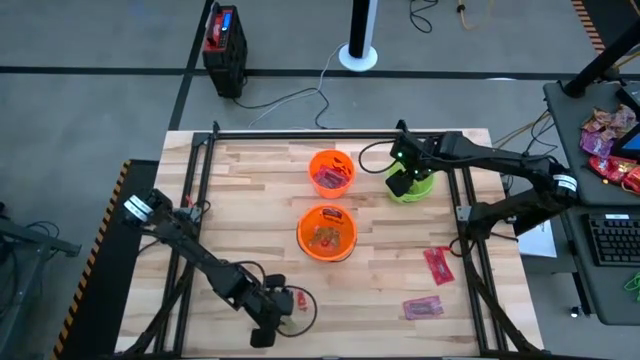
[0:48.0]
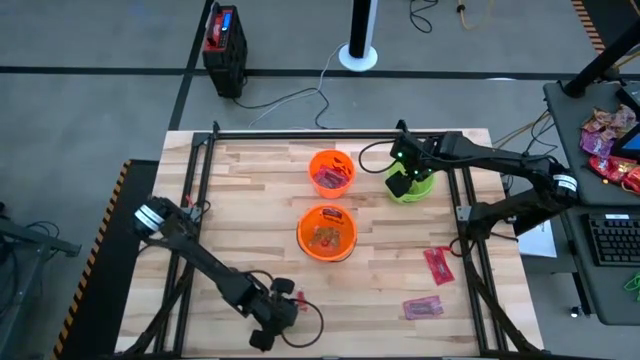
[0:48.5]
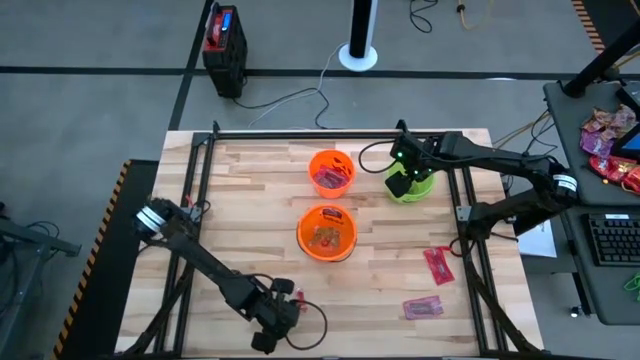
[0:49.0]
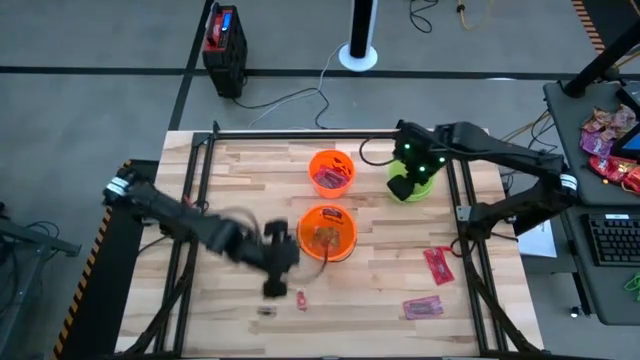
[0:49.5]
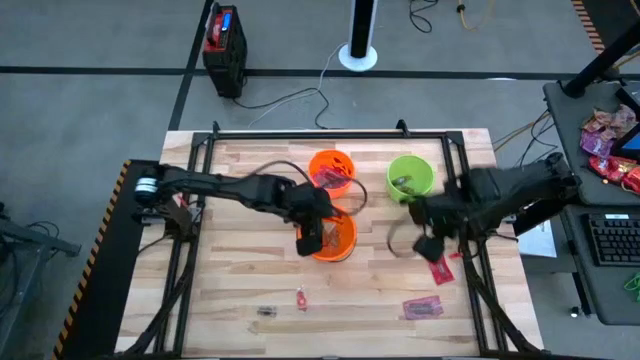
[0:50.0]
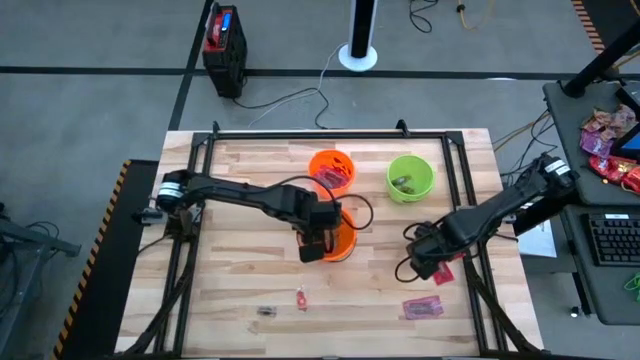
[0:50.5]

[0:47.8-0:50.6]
Task: Sort candy by brand, put in halloween buckets
Put the green candy into the bottom orange bin

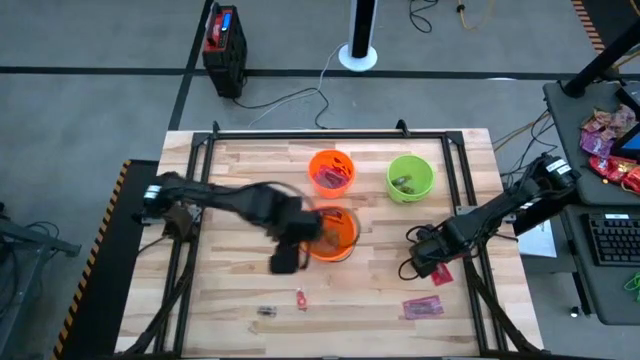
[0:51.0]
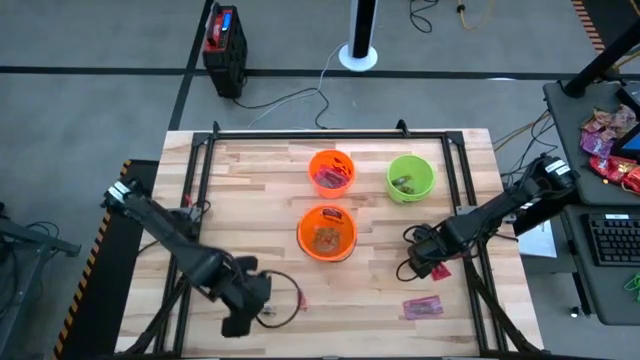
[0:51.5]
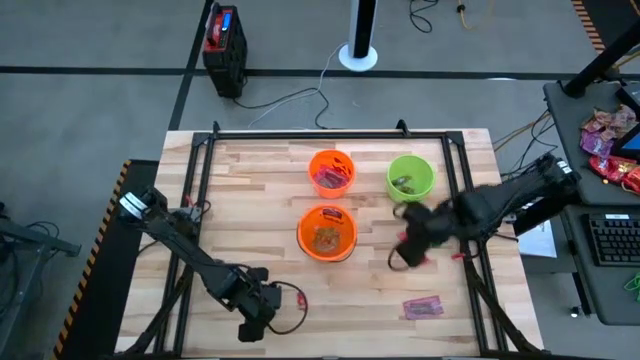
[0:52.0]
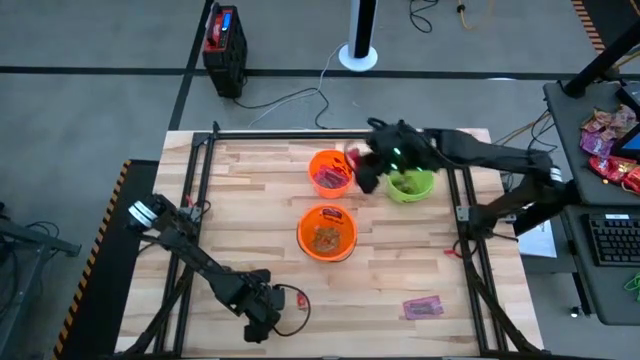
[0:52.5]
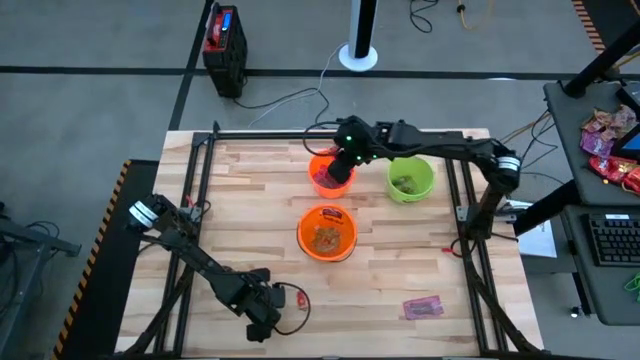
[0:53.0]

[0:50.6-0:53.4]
Put the red candy into the top orange bin

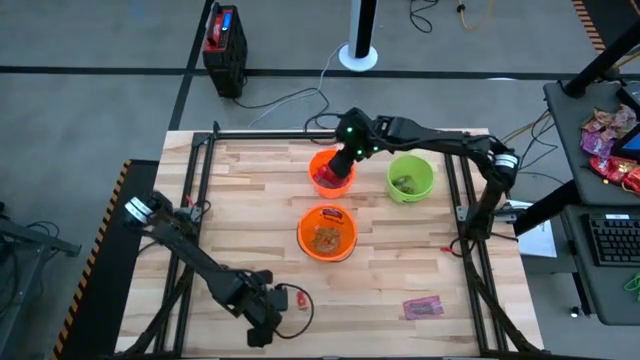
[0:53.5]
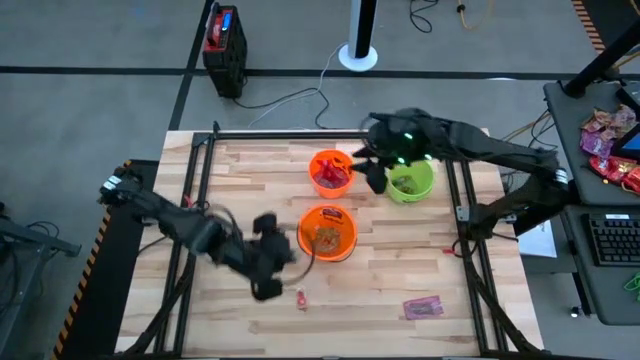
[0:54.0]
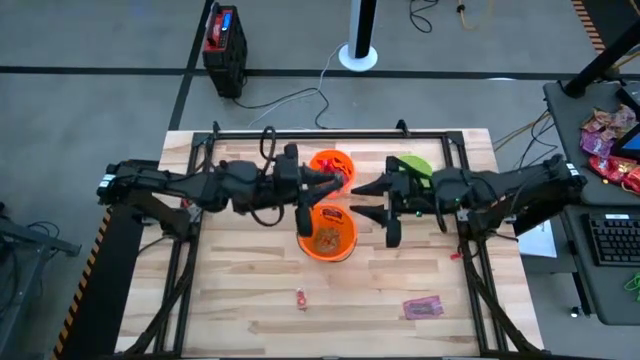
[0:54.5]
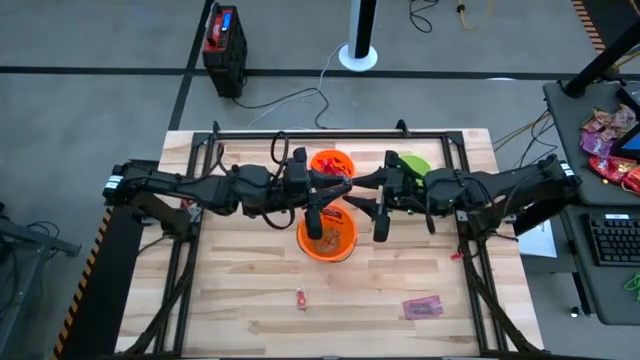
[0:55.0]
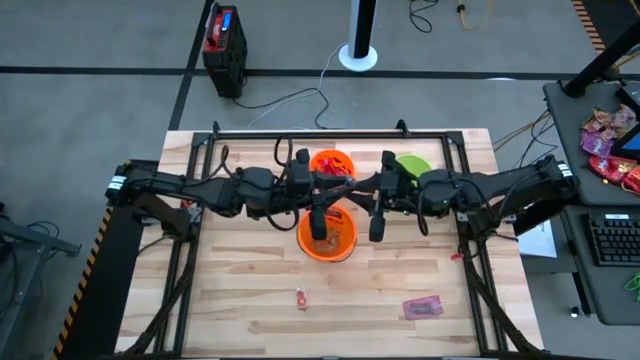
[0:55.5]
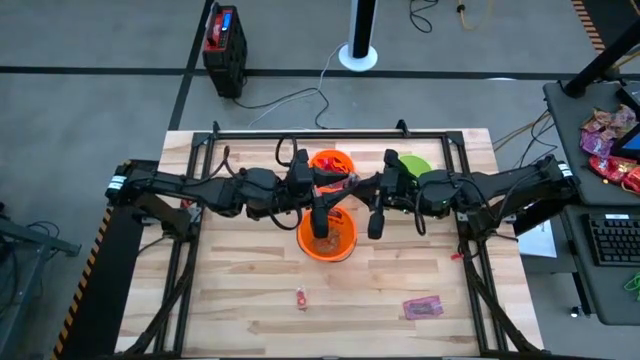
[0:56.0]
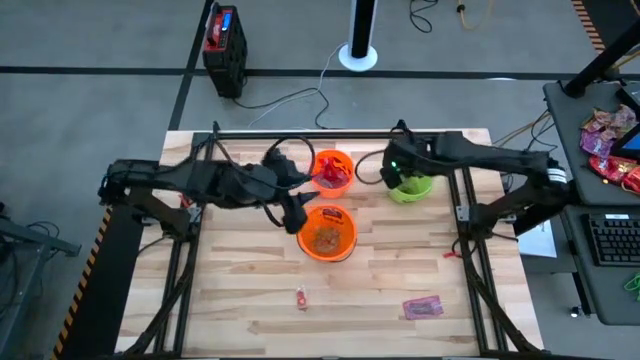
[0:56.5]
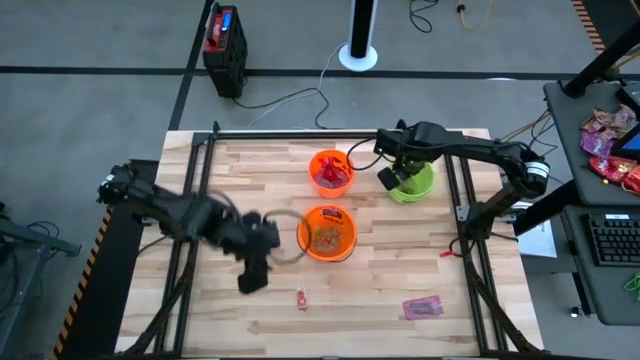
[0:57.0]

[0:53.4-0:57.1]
Put the black candy into the green bin

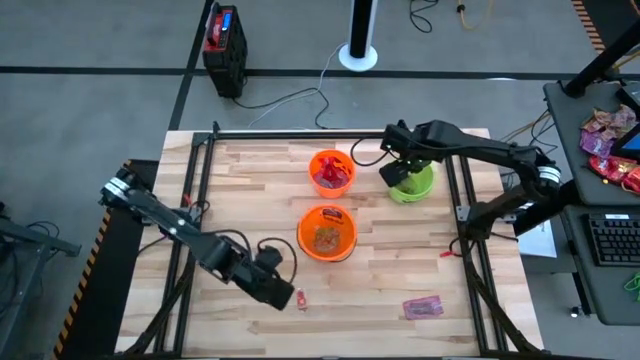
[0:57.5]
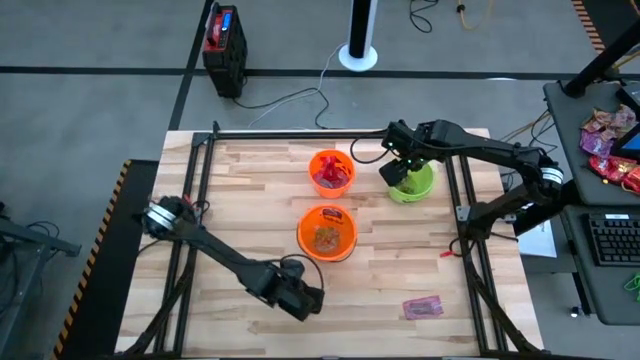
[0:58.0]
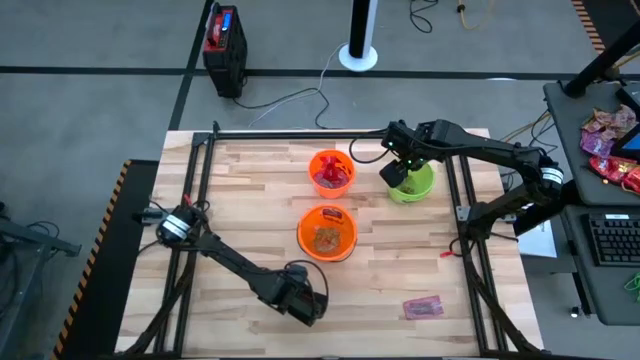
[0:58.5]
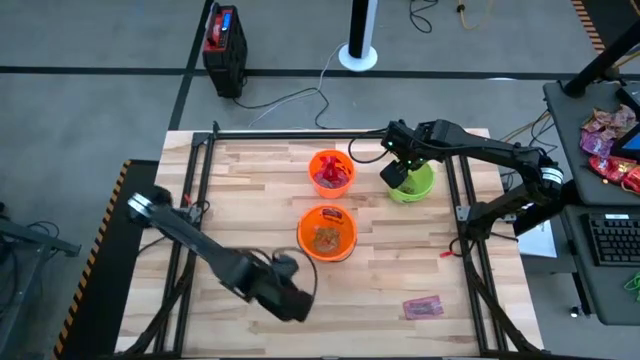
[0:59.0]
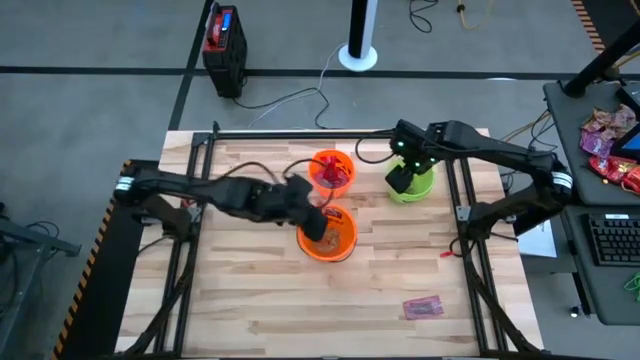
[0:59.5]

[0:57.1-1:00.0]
Put the orange candy into the bottom orange bin

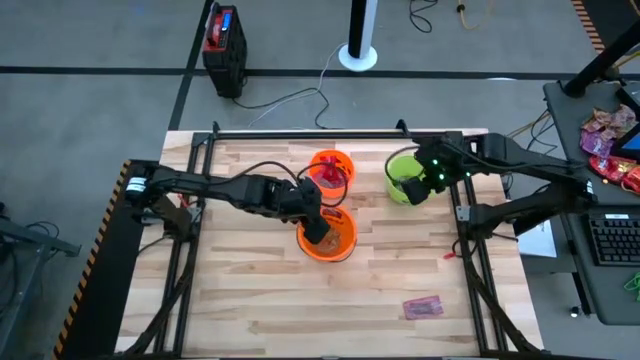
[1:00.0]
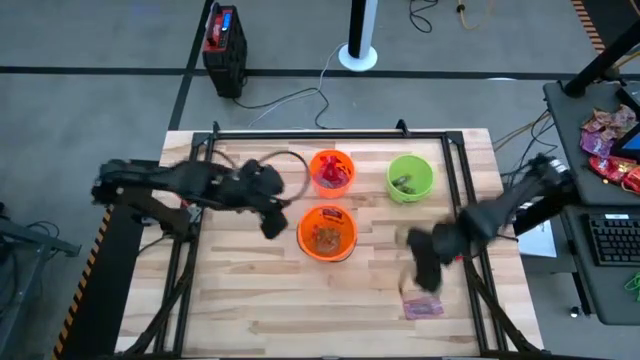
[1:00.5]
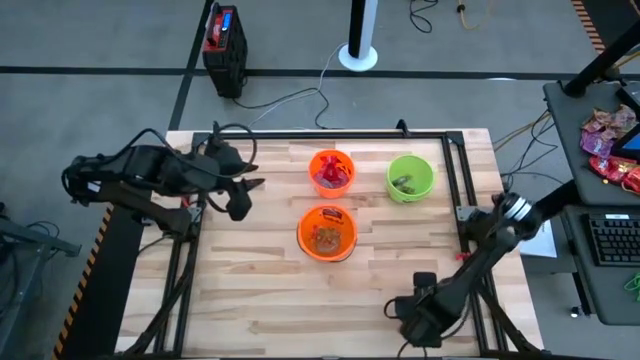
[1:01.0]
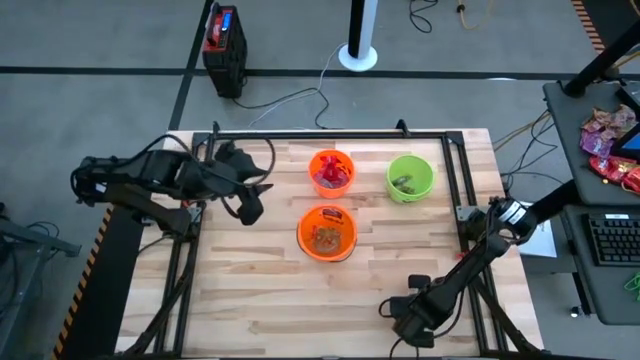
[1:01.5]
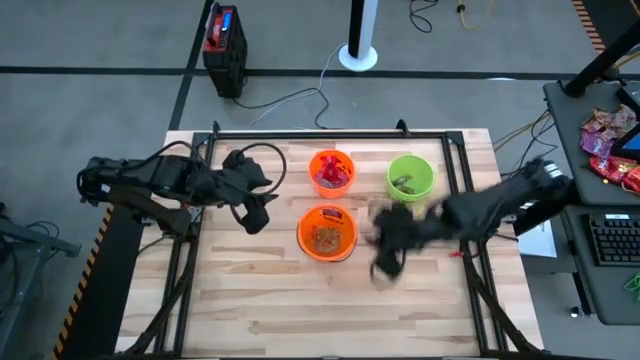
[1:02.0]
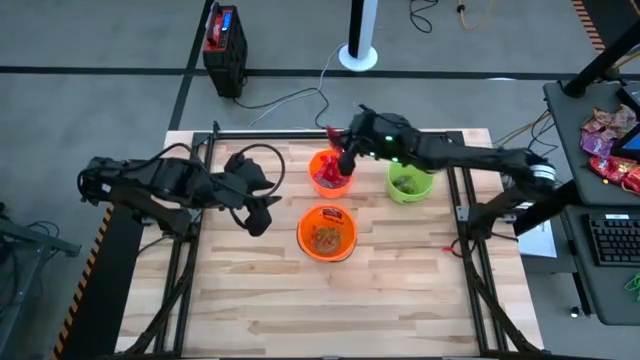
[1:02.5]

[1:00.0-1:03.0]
Put the red candy into the top orange bin

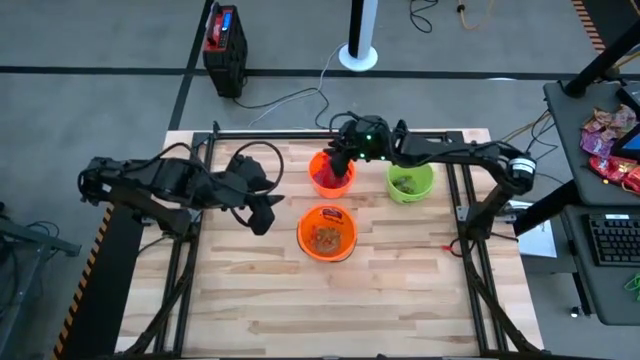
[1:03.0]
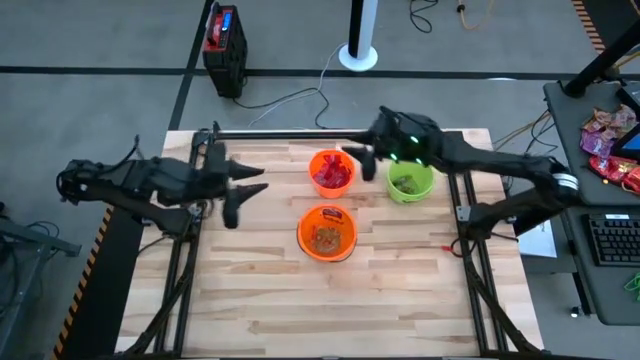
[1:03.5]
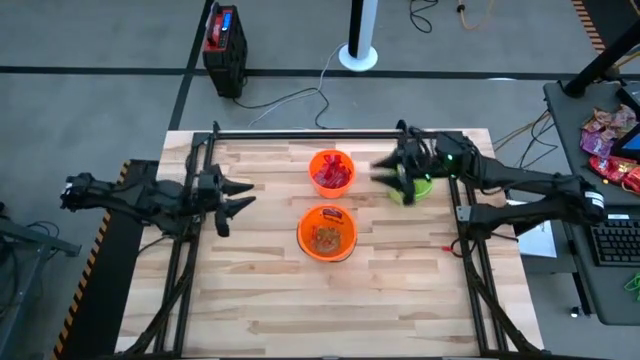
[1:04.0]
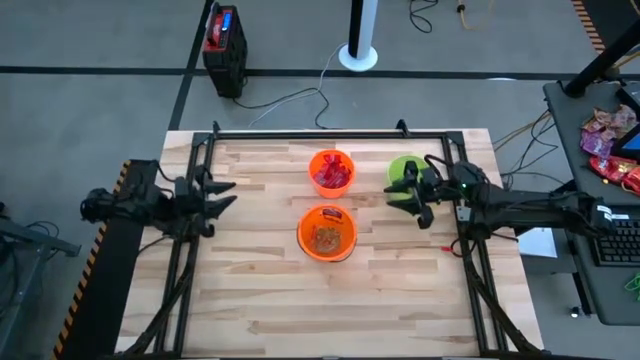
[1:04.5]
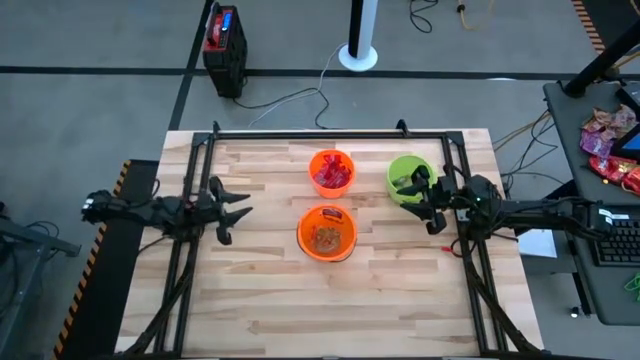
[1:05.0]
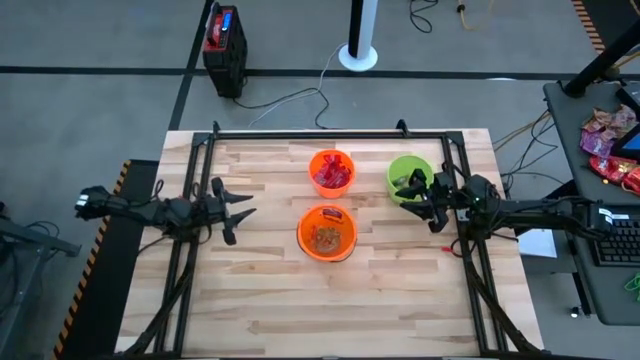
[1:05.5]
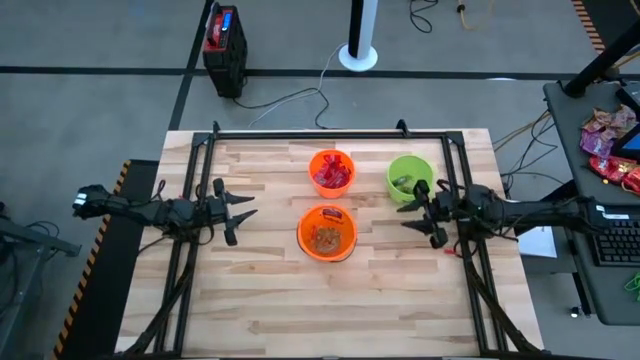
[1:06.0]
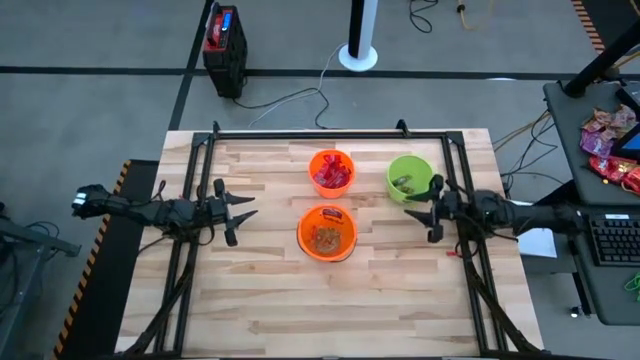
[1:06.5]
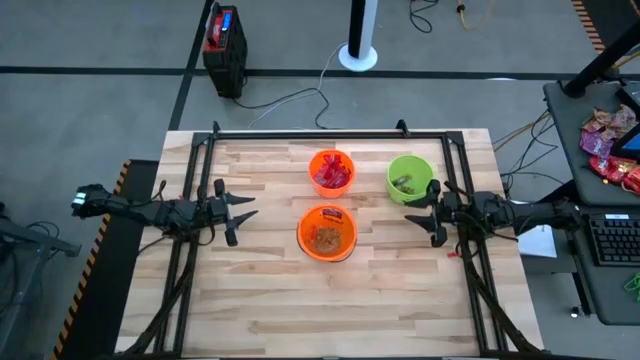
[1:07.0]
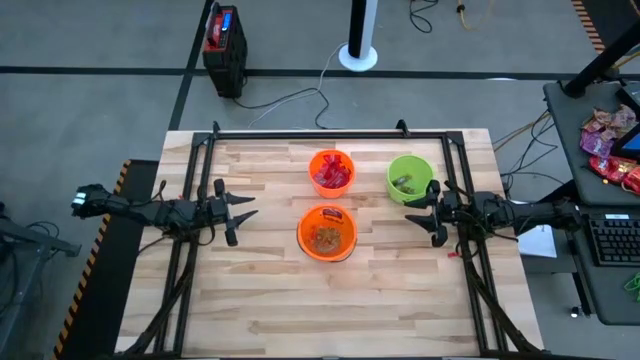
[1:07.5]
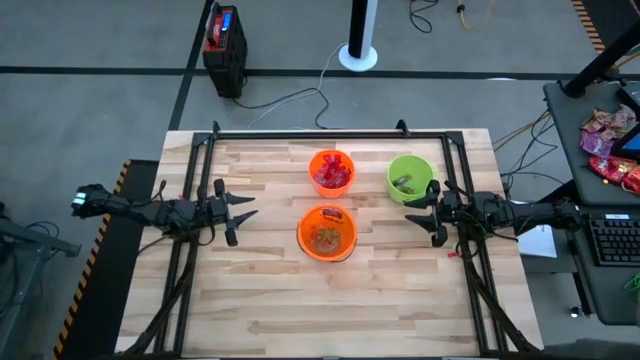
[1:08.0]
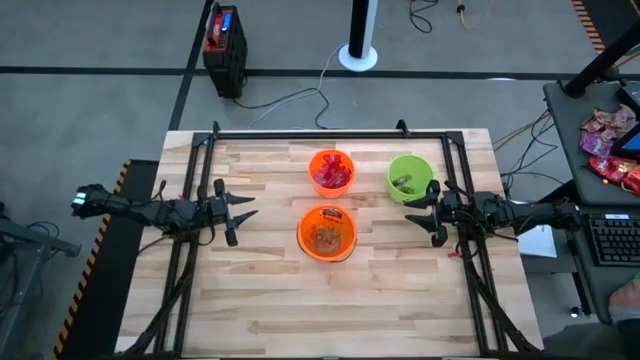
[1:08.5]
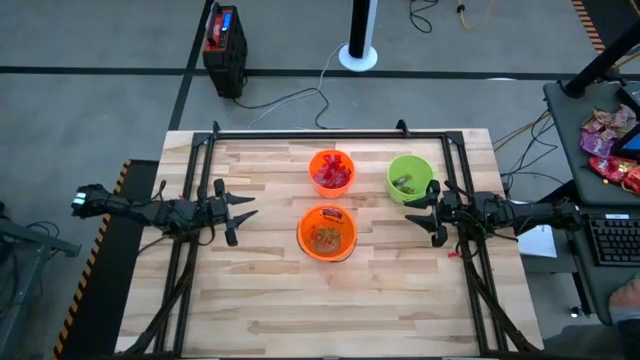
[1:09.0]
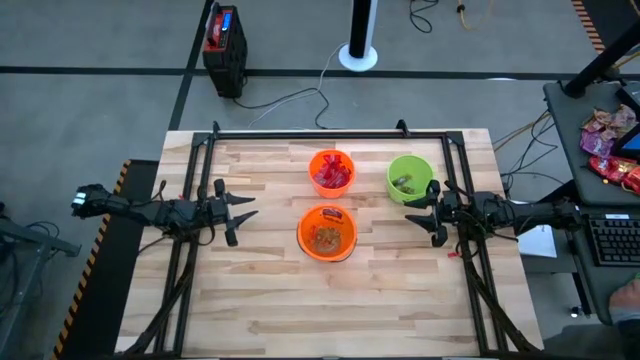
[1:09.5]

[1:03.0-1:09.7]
Return to Home Position
